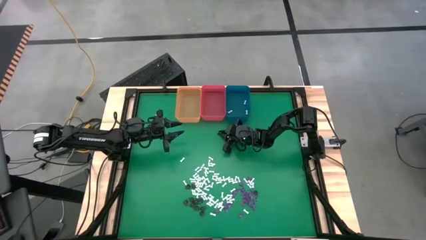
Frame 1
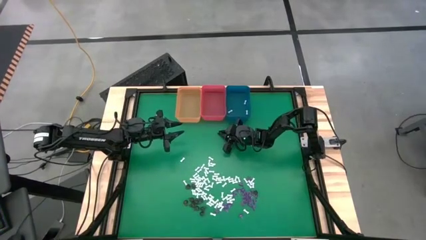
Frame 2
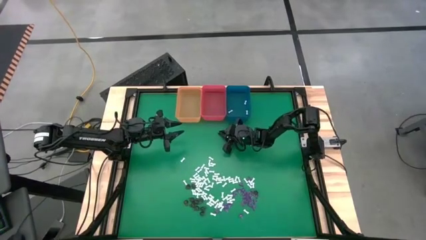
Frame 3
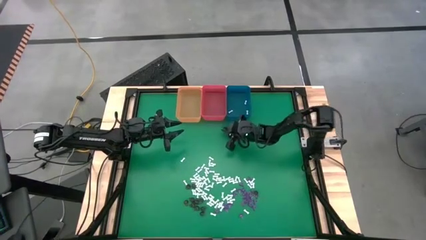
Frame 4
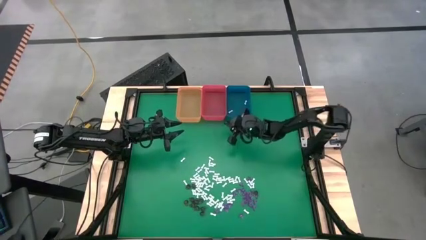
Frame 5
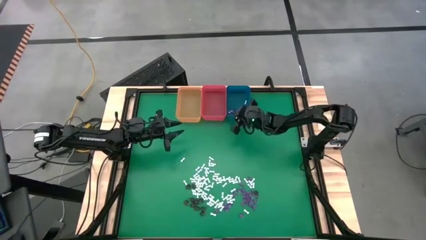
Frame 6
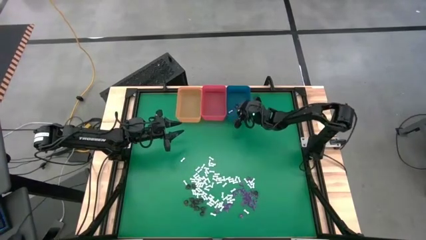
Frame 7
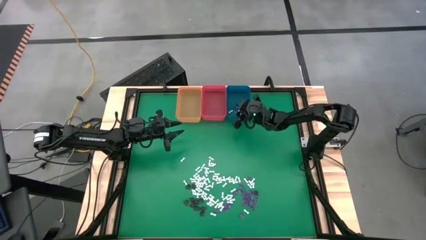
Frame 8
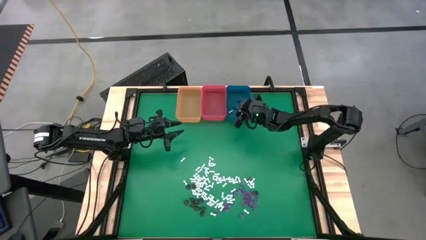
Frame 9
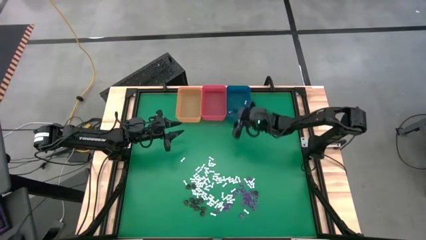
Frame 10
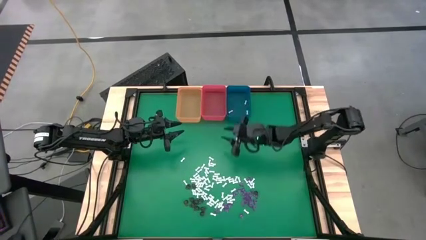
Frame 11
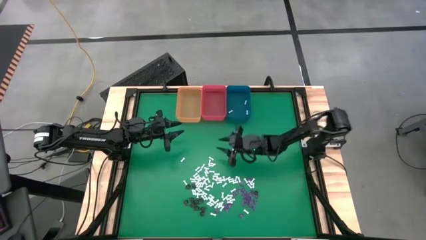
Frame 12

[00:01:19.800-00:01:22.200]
Task: Sort Halloween decoration
Put the white bone toy into the blue bin

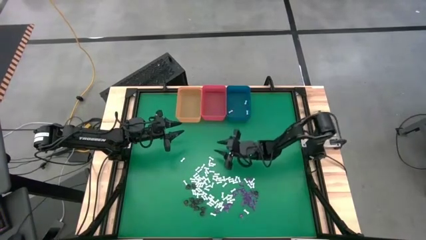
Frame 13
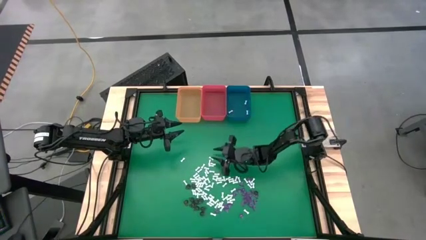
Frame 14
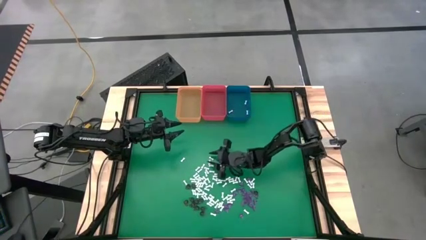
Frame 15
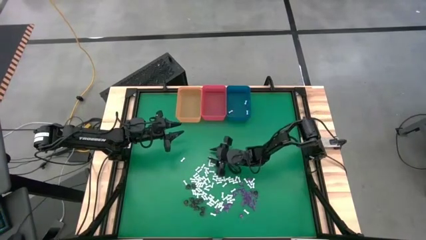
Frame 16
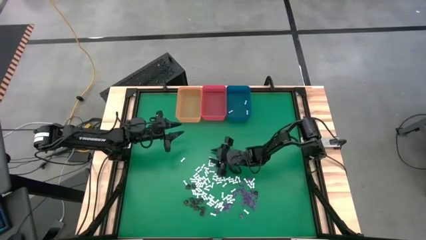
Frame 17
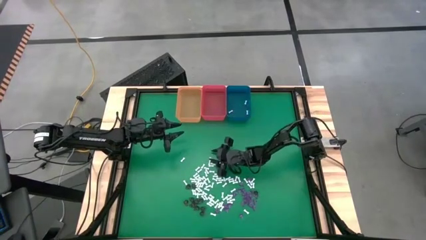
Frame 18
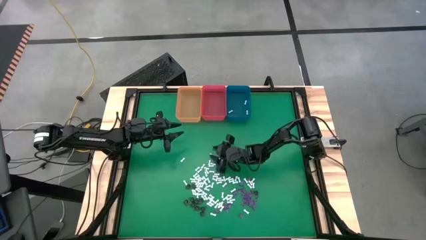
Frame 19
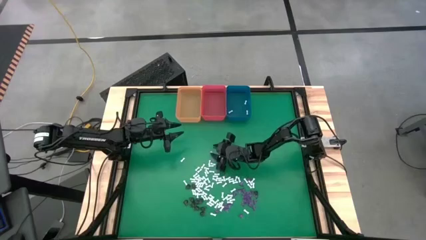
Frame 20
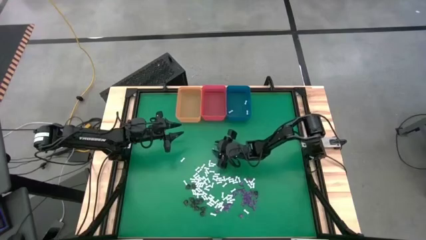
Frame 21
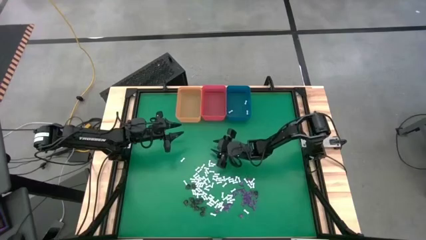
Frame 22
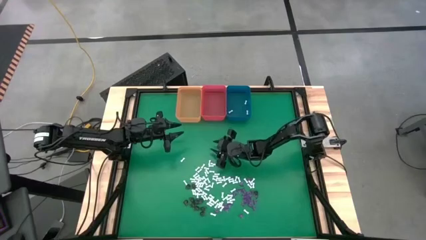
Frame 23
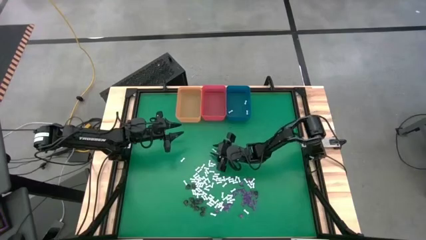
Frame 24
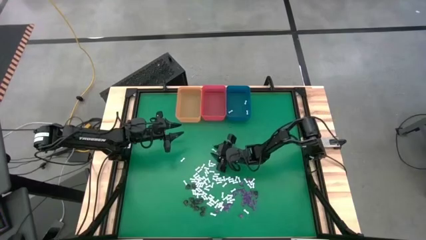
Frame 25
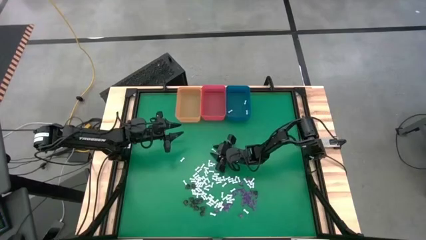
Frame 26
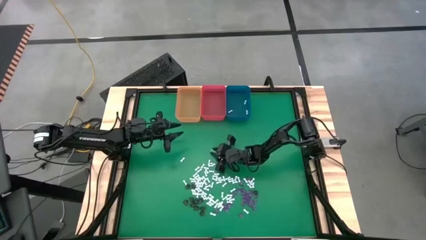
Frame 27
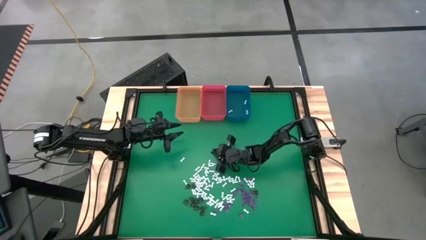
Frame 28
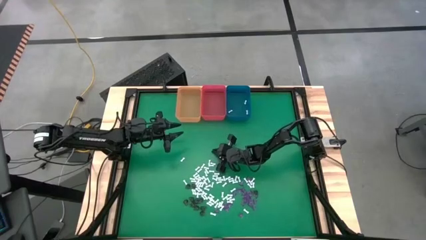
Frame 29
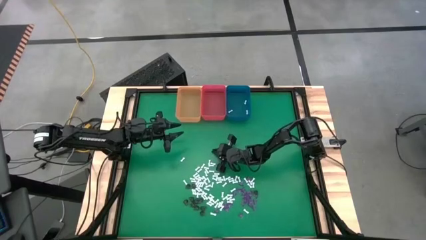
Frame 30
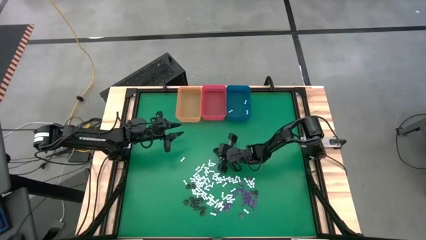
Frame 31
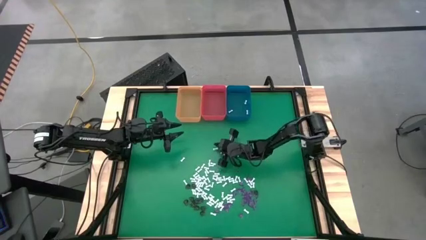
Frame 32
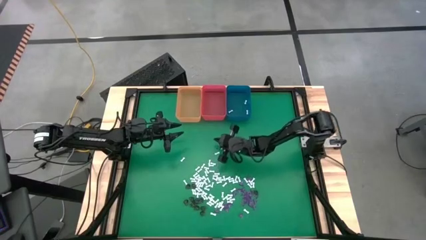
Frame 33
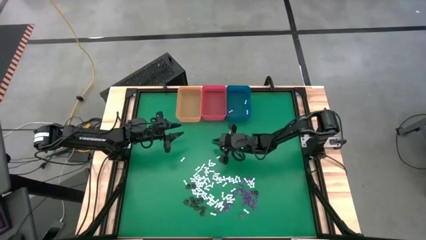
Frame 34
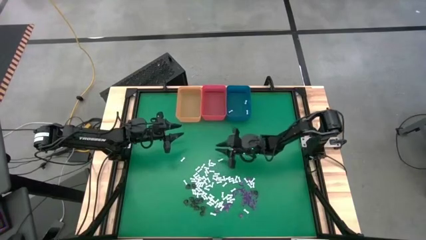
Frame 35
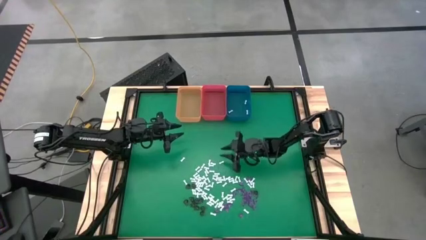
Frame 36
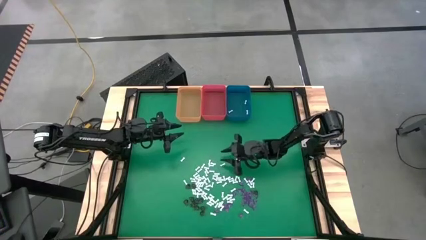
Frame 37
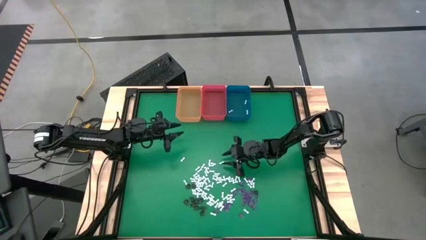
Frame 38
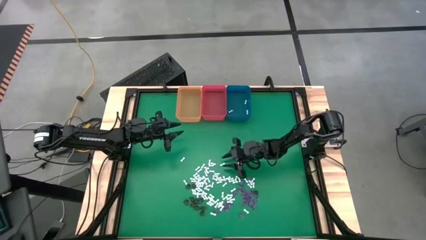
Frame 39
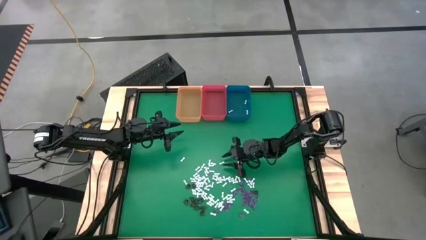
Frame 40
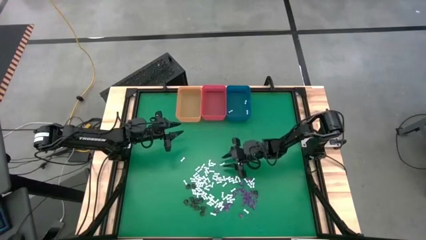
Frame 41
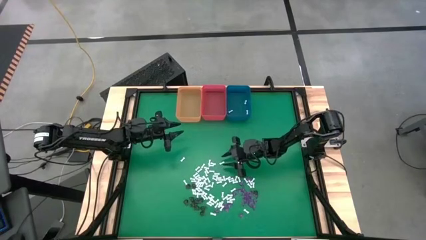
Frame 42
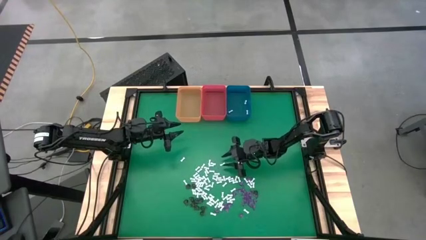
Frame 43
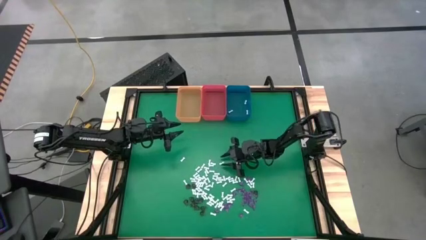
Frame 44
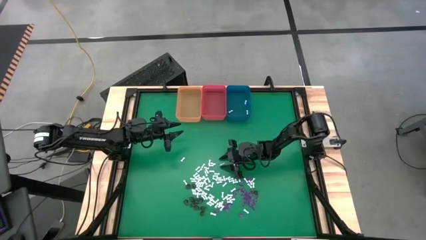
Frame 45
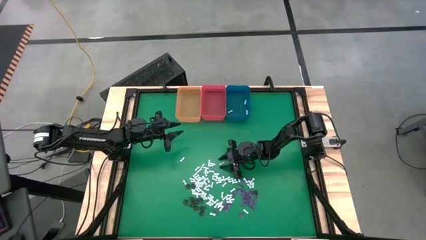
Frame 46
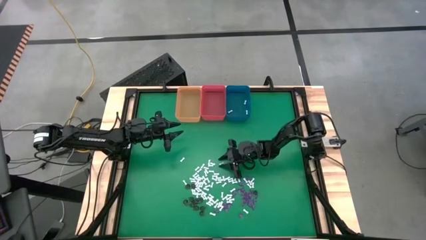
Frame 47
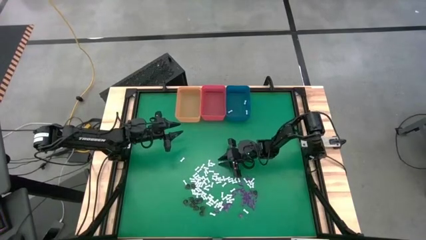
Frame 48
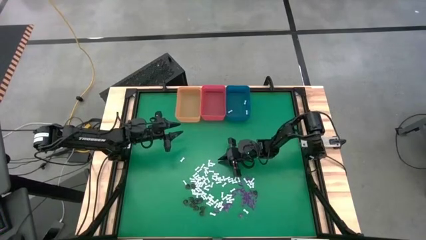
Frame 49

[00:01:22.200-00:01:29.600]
Put the bone into the blue bin

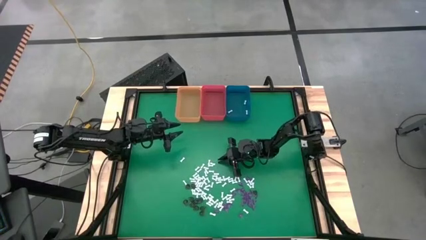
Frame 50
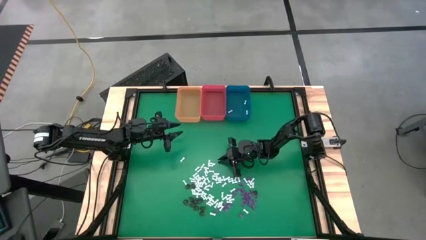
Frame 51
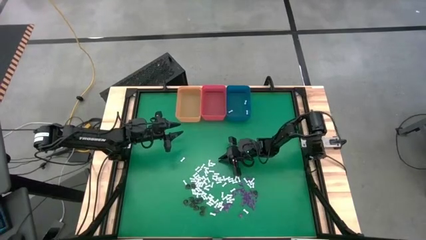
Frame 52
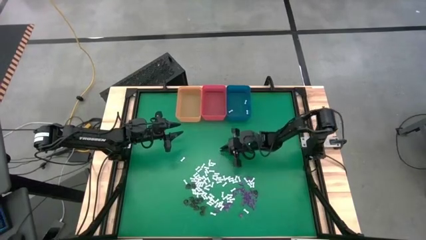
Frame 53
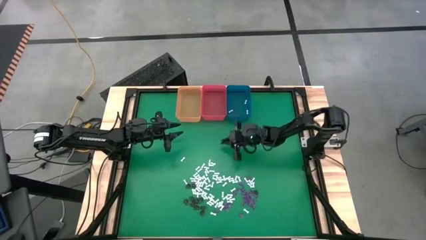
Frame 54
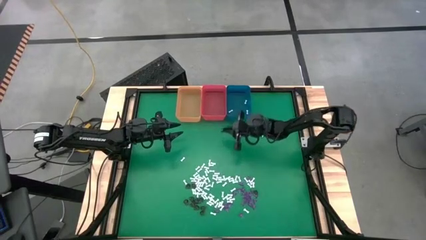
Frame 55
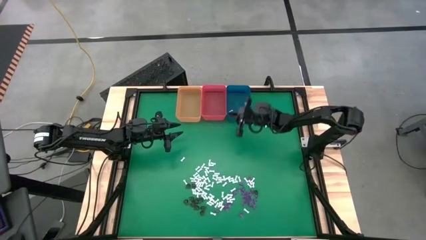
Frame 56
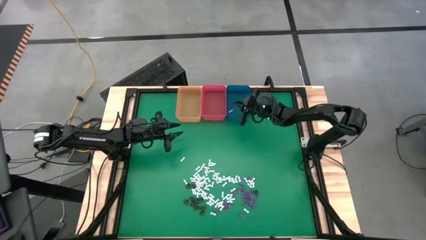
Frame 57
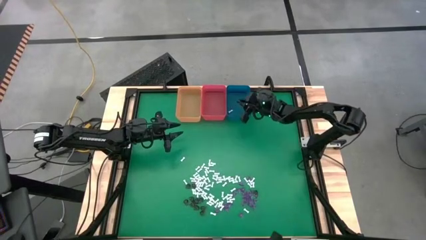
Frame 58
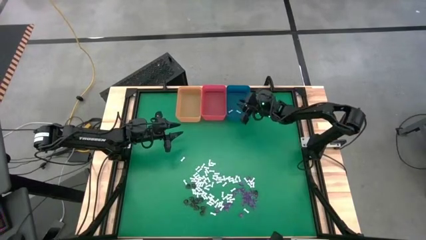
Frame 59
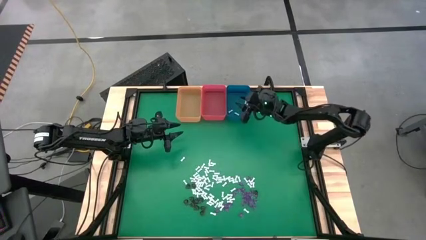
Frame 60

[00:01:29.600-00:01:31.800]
Put the white bone toy into the blue bin

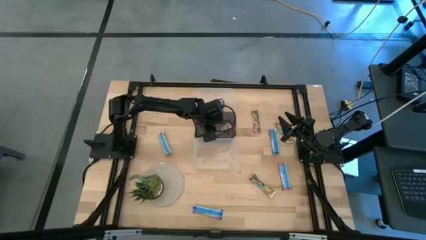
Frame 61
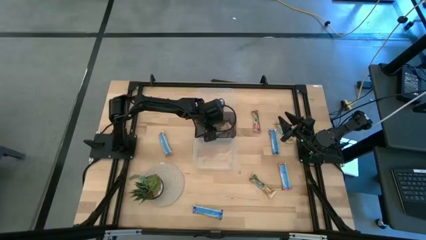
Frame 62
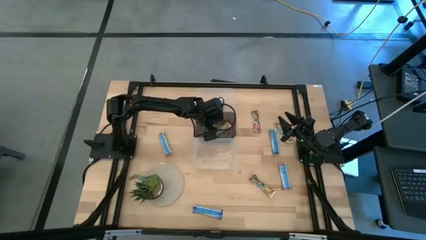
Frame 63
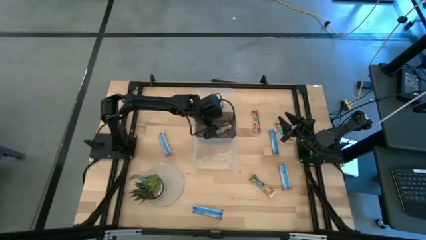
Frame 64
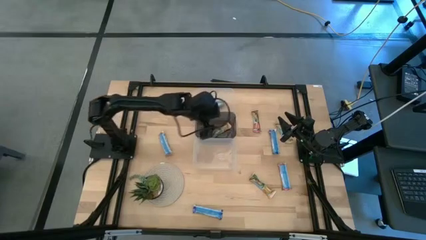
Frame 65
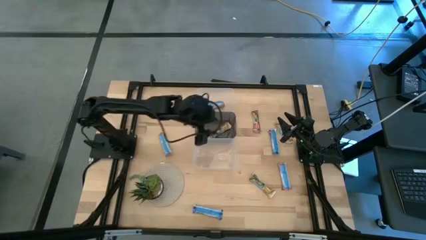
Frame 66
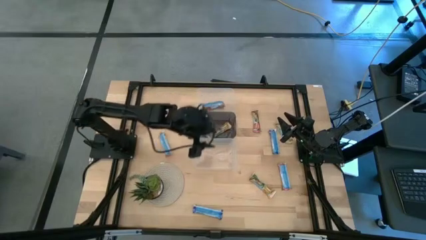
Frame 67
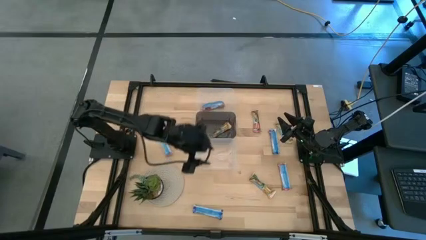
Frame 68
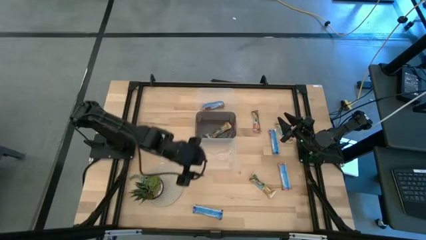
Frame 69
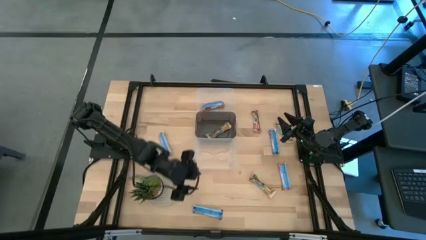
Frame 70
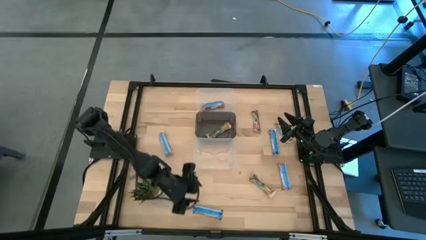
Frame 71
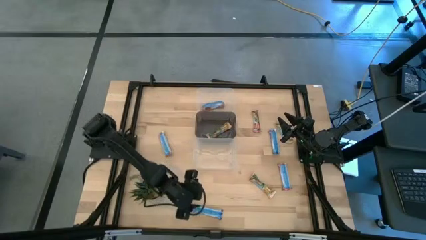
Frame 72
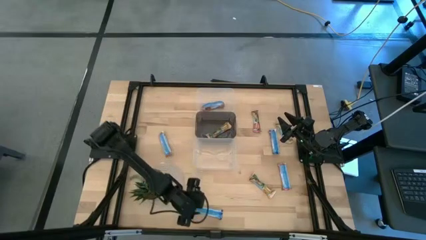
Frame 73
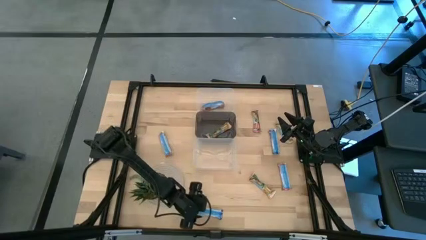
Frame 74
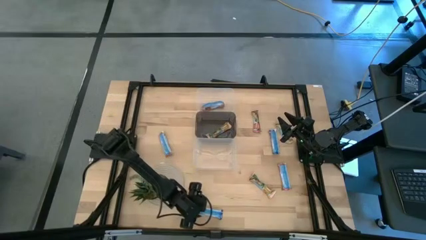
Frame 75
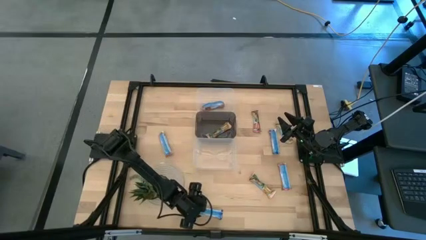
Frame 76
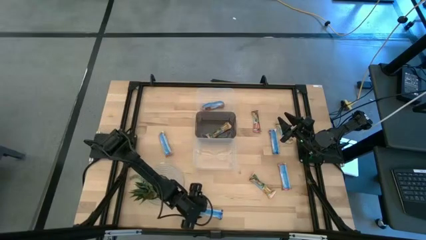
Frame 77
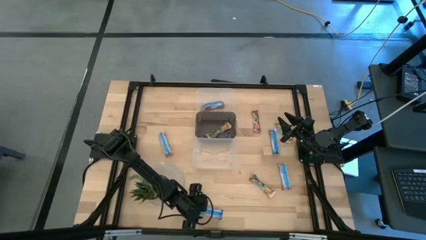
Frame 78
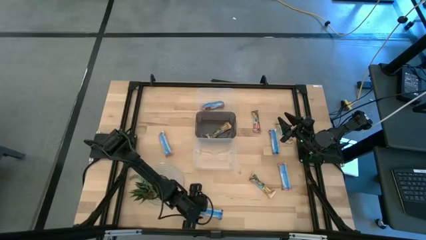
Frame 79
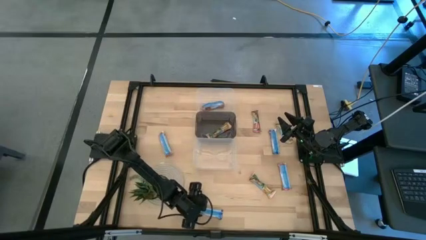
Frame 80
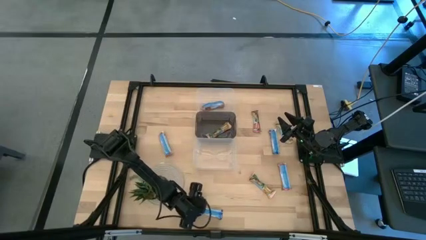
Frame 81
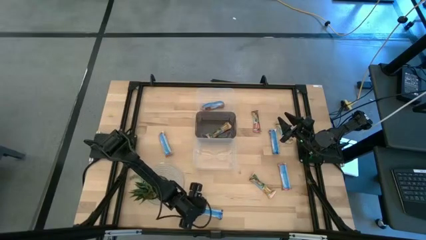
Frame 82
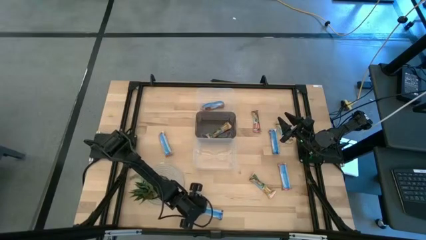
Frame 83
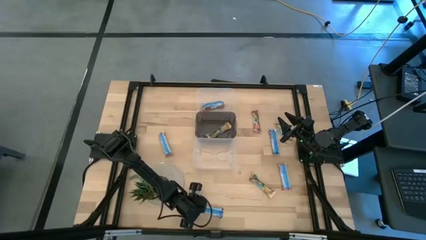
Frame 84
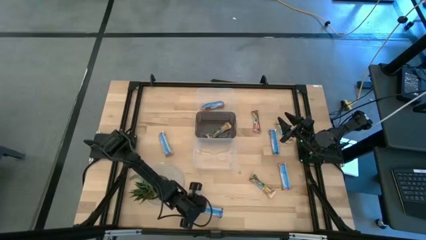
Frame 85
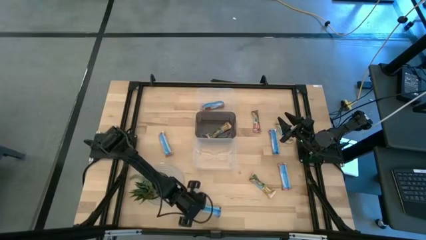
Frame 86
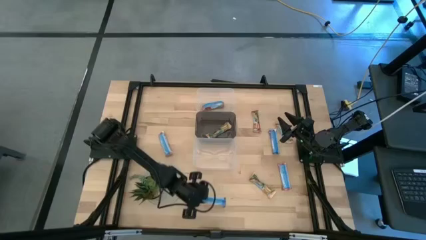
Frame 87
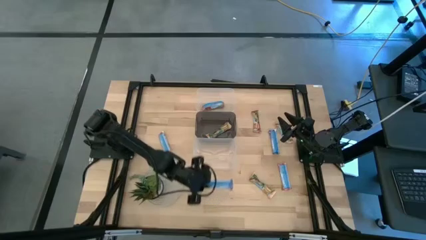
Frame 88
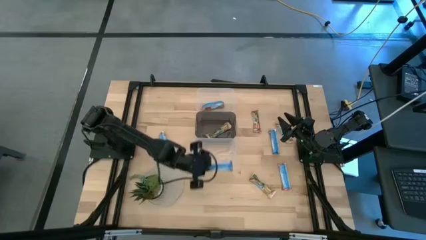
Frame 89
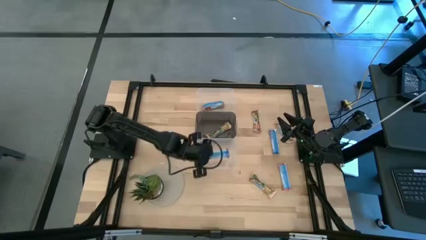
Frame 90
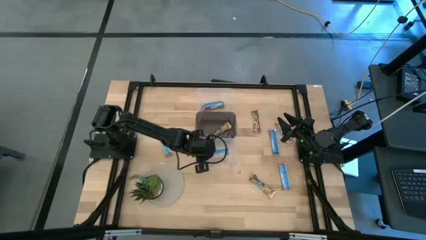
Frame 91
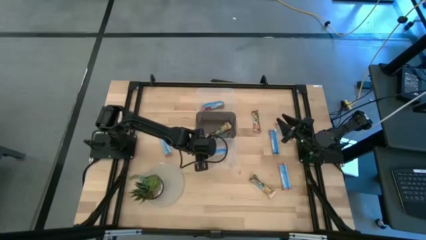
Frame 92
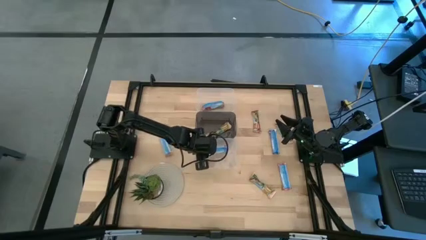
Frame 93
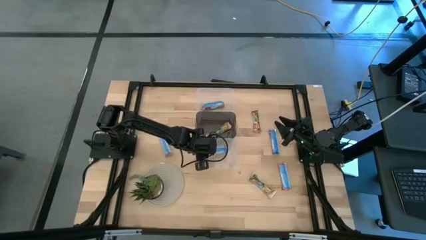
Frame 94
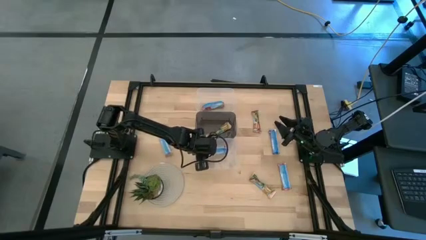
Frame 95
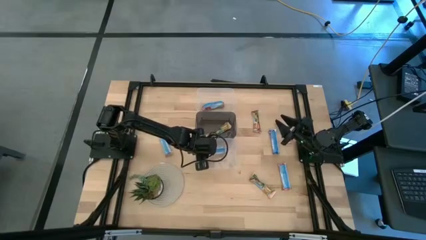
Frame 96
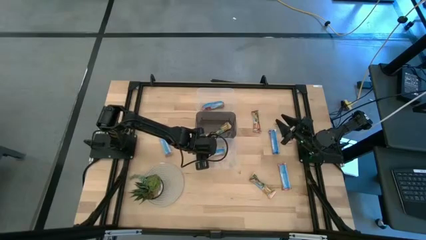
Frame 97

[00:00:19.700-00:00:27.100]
Task: Pick and place Granola Bars by type
Put the blue granola bar into the bottom transparent bin
